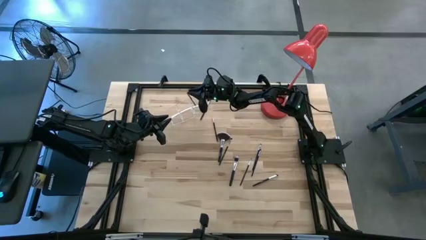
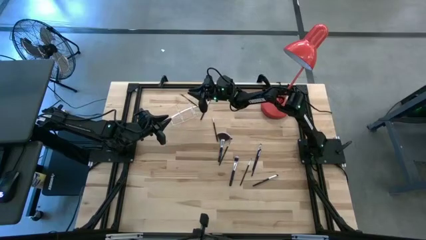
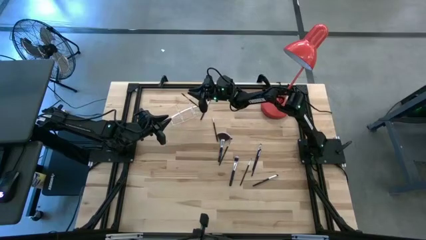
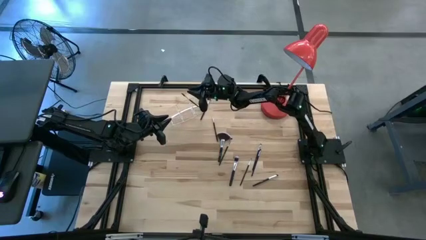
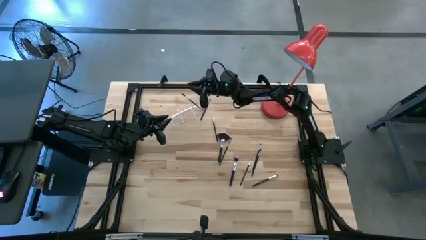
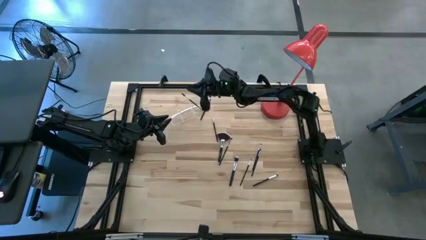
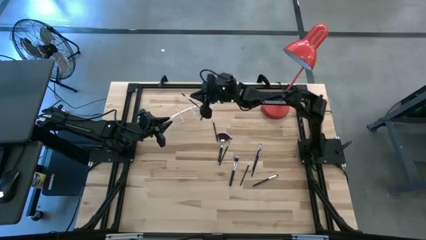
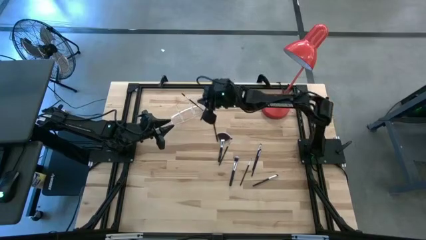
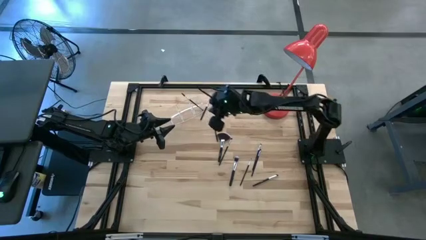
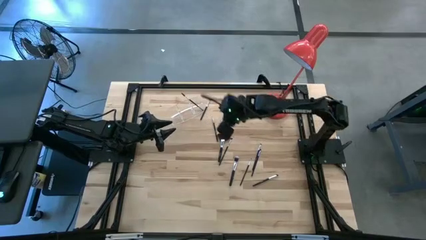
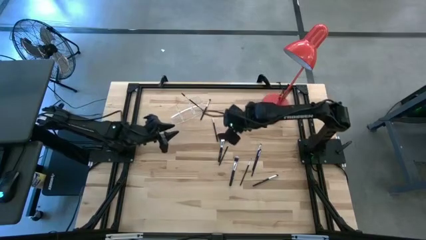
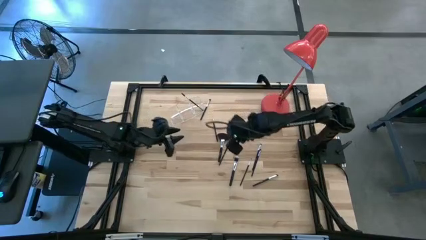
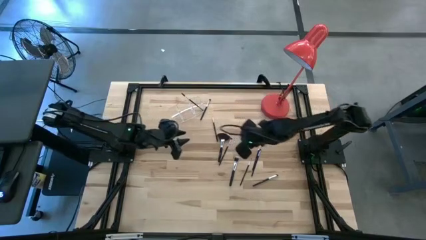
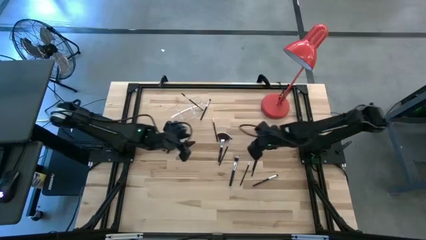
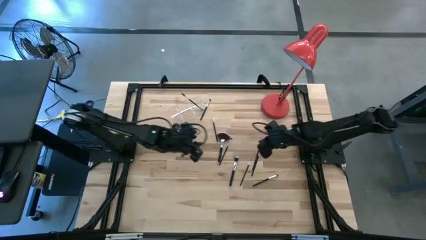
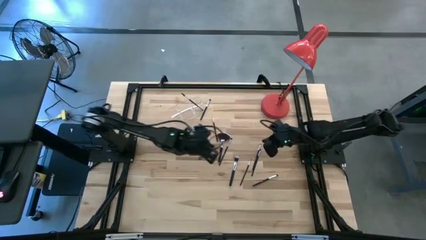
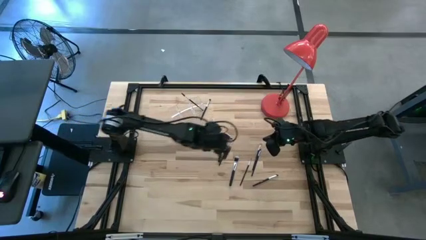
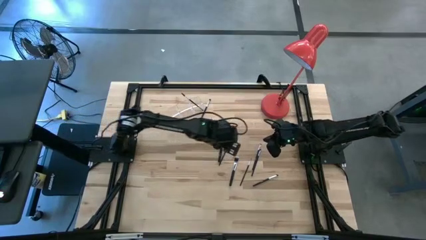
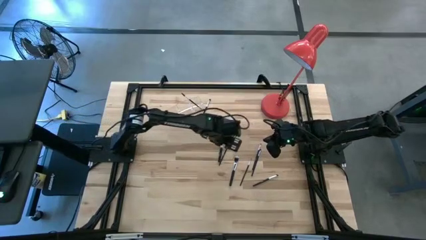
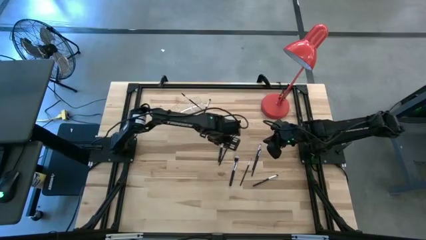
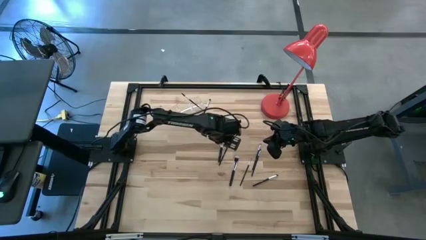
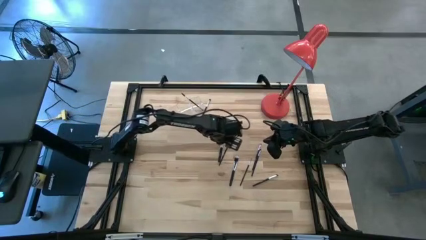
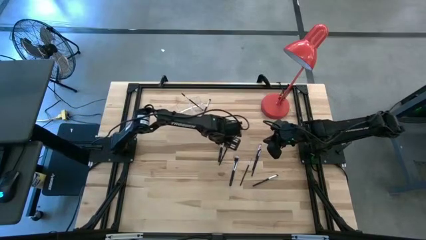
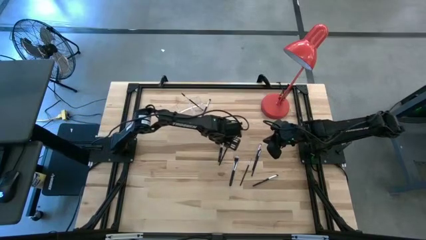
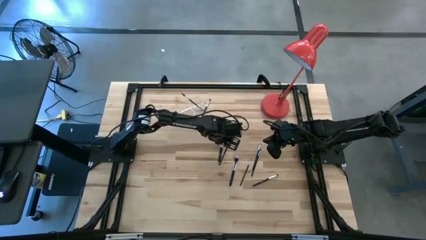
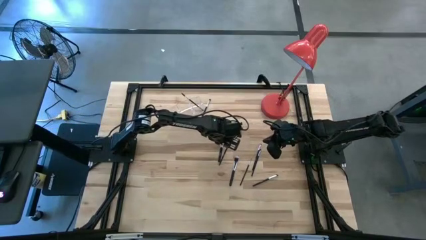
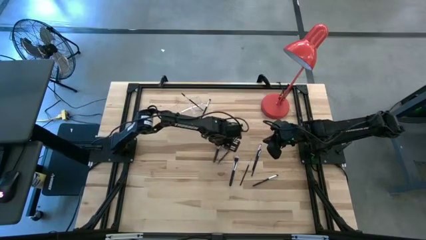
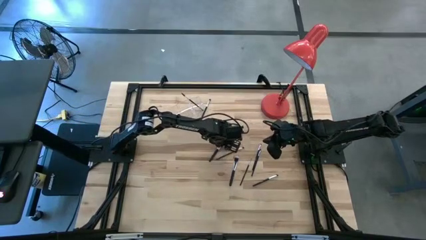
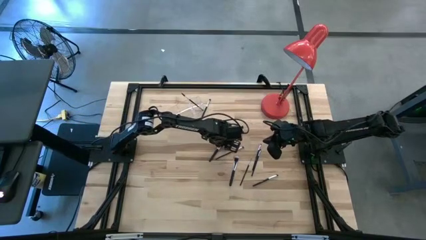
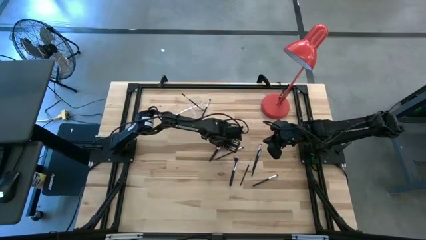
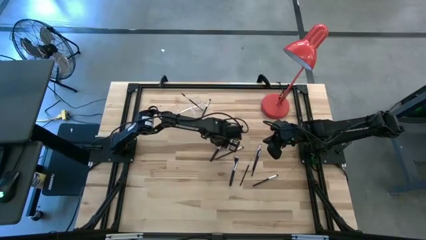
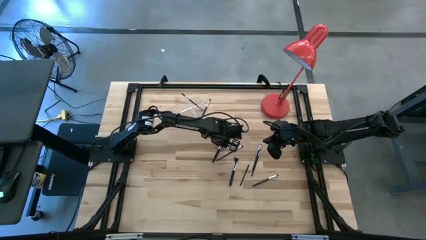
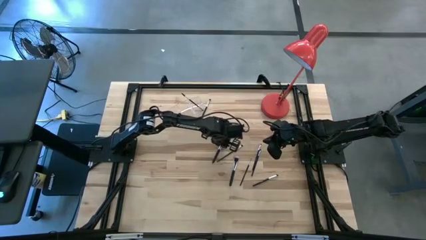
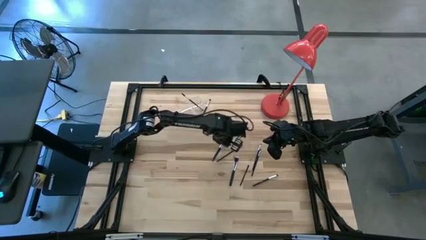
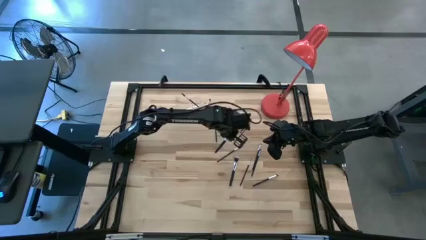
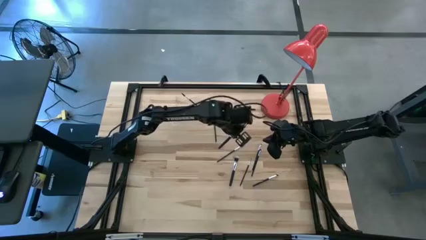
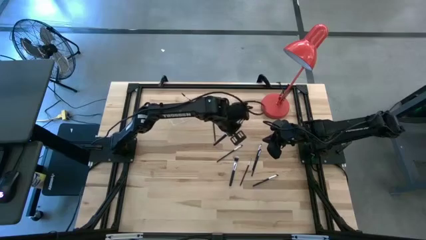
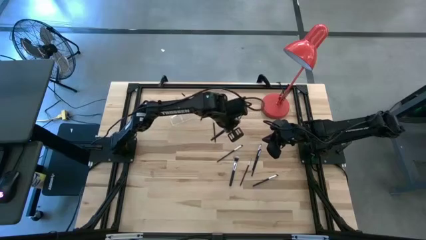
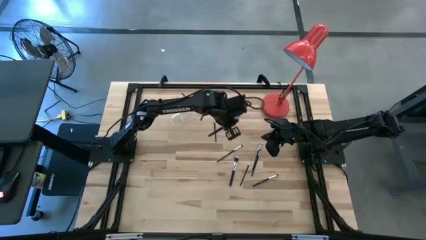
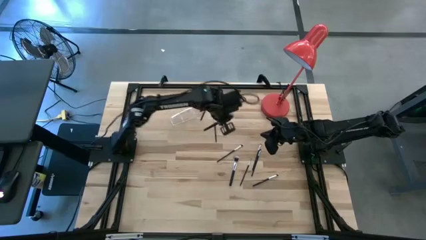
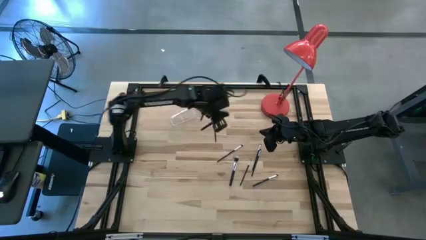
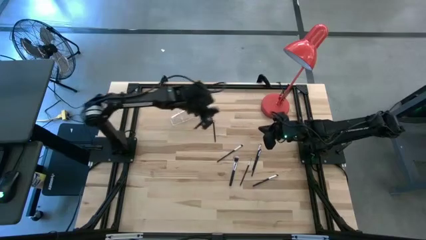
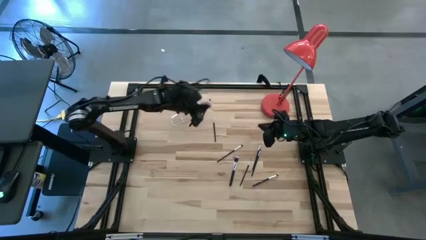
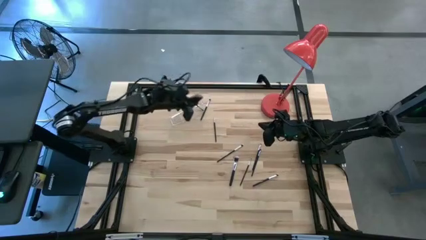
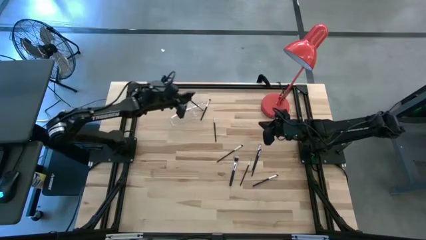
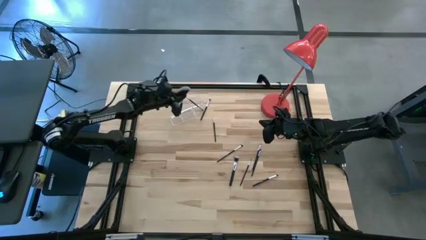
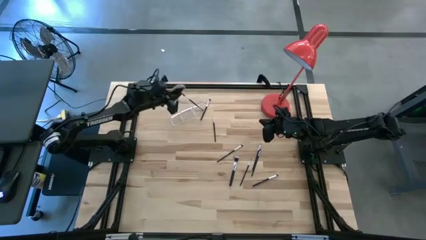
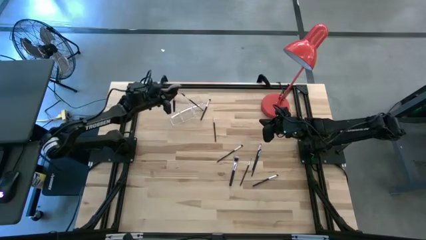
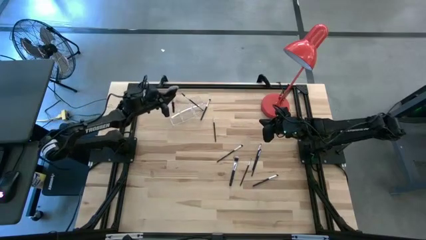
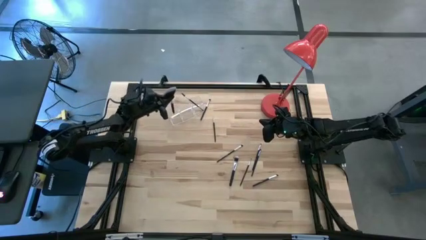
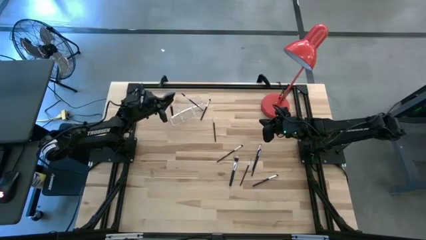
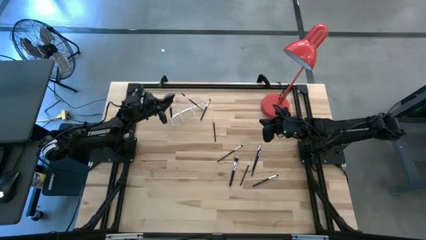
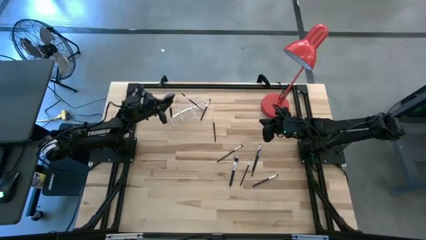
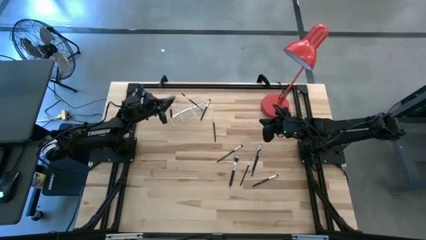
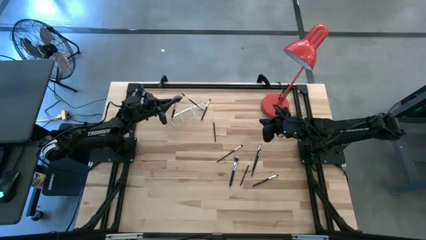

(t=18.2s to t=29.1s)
Task: Put items in baskets/containers
Put the highlighter brush into the transparent organizer
